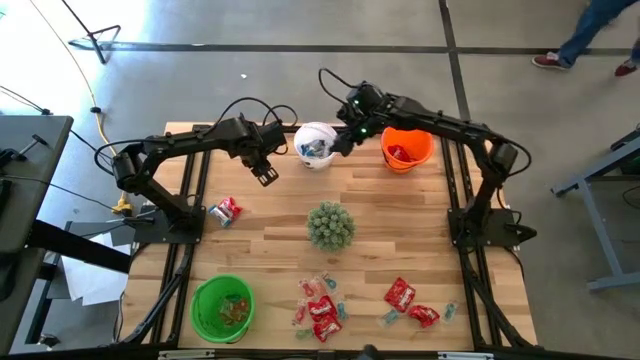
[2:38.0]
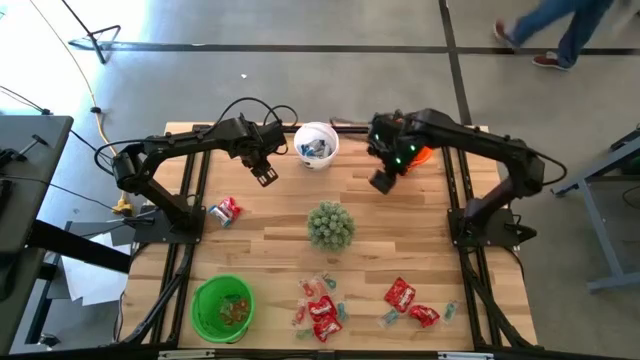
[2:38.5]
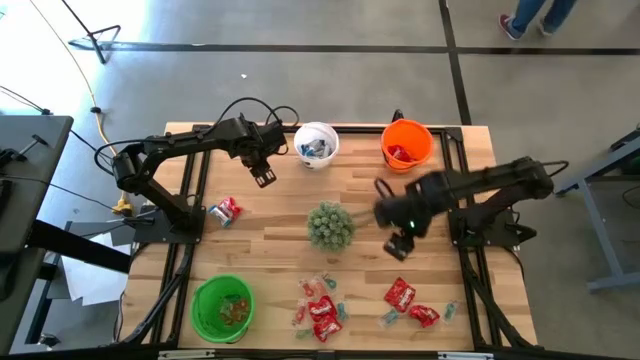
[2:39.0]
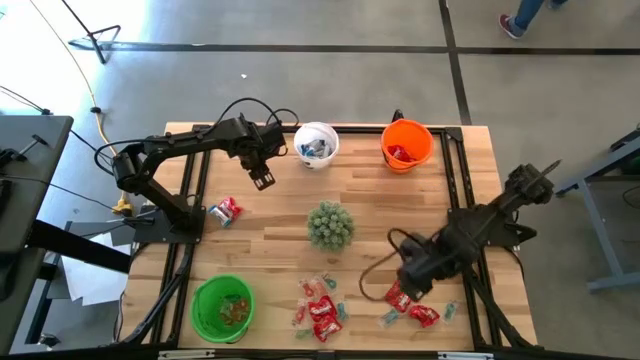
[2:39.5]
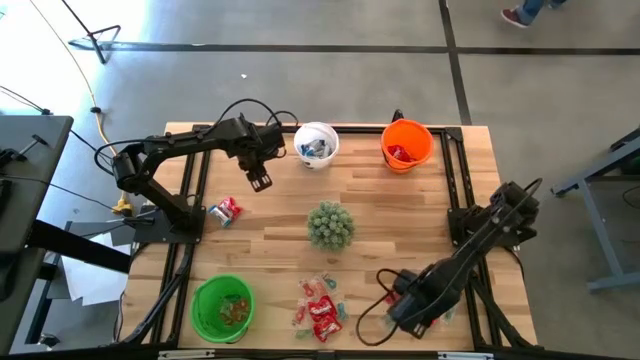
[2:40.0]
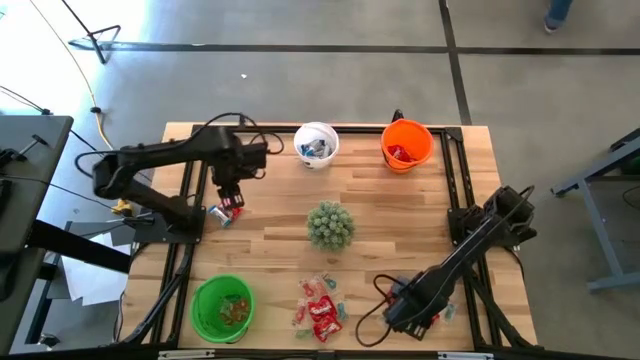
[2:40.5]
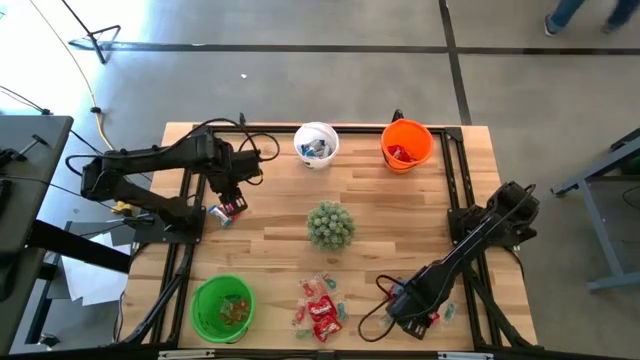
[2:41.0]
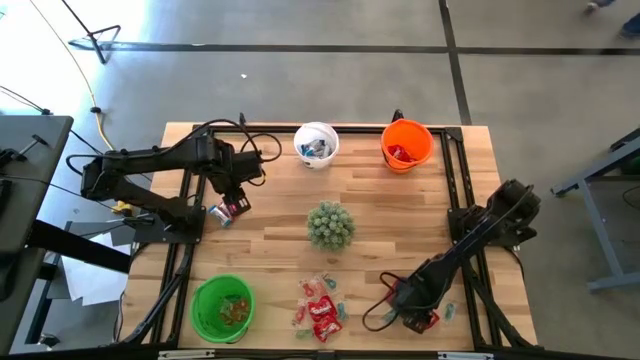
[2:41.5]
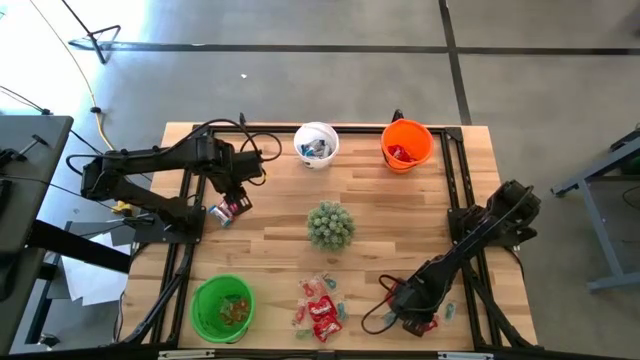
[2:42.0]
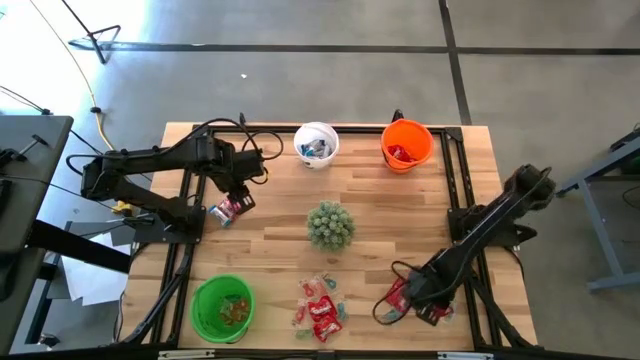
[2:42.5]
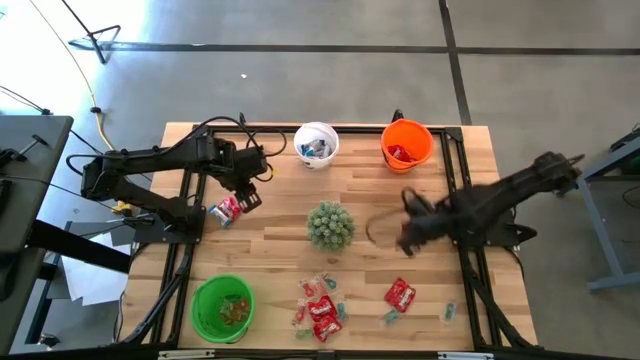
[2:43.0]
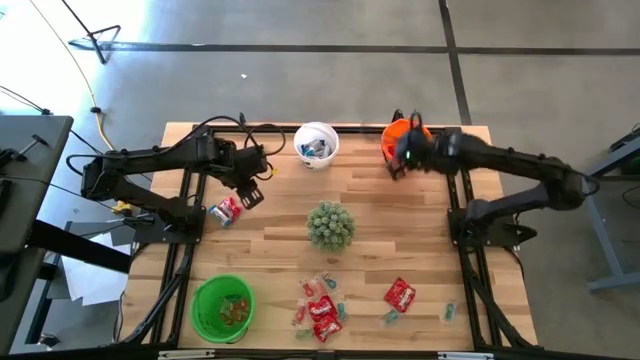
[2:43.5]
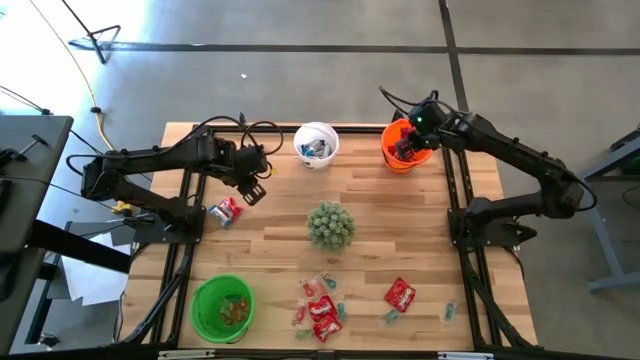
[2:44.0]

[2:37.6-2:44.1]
Task: Sort candy
Put the red candy into the orange bucket

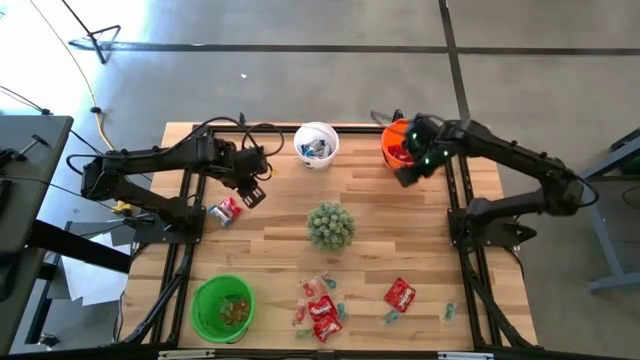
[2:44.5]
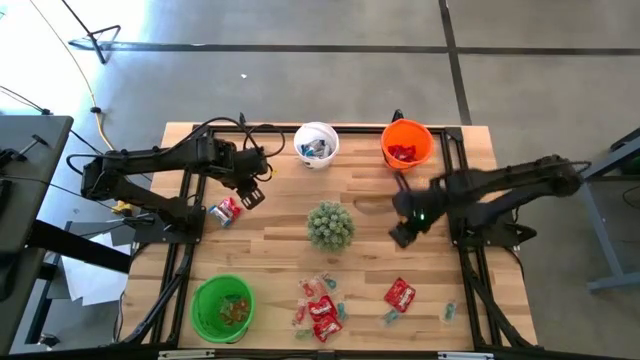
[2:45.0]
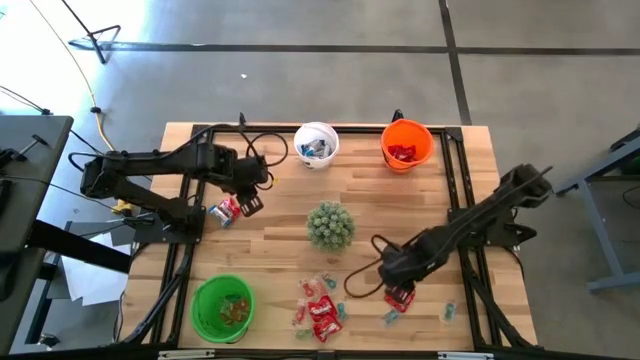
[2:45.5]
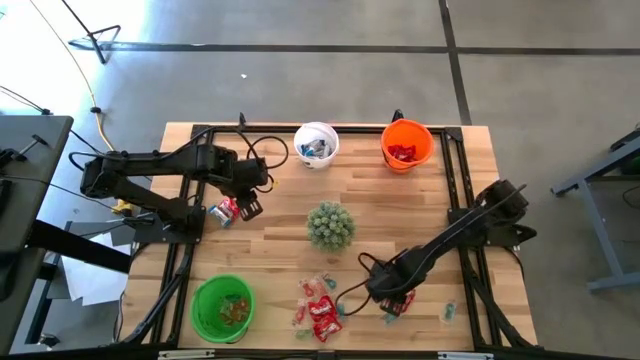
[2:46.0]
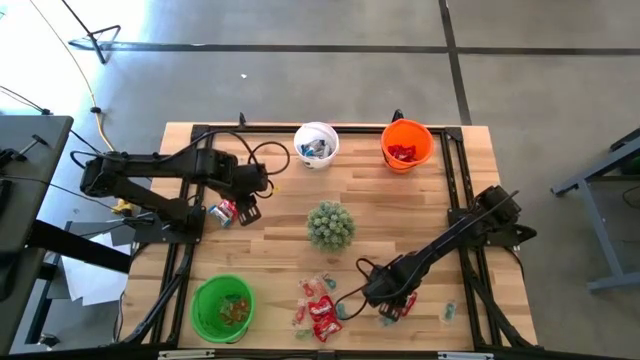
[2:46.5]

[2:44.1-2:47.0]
Put the red candy into the orange bucket

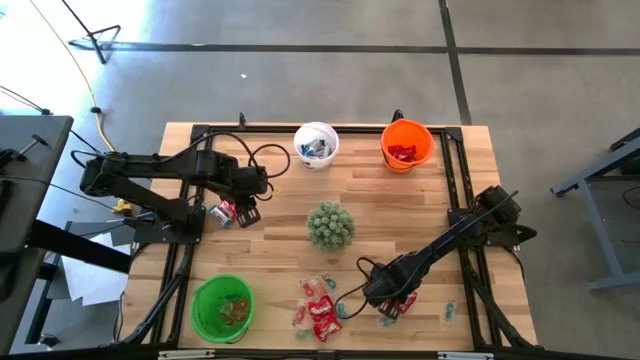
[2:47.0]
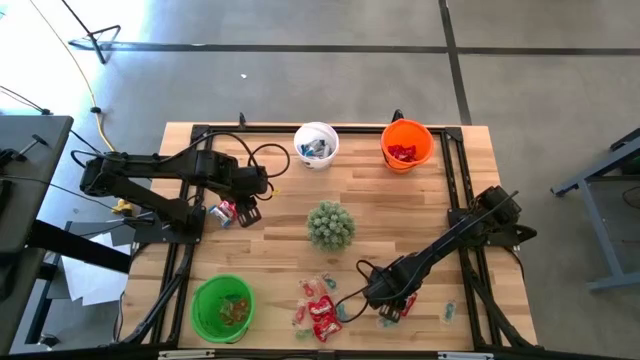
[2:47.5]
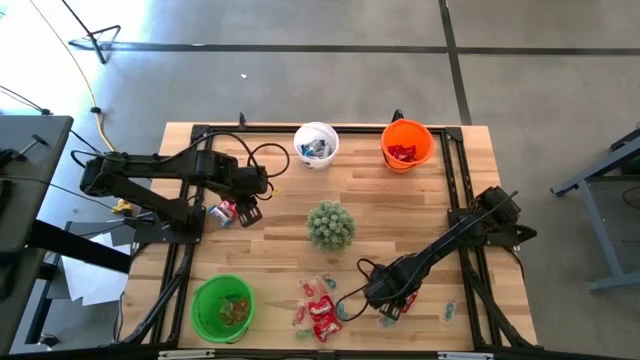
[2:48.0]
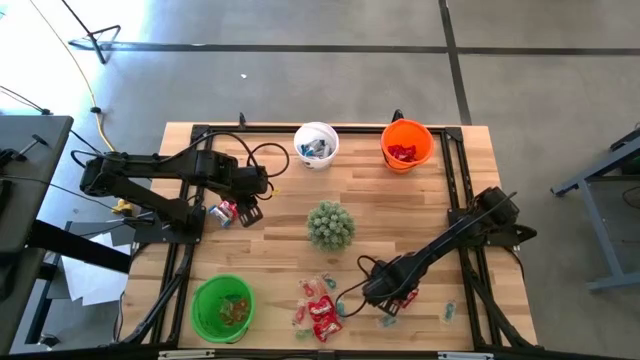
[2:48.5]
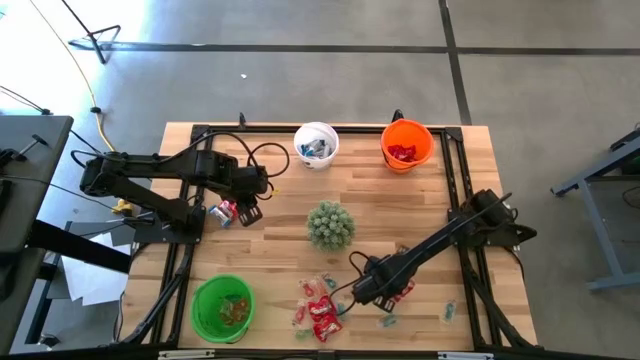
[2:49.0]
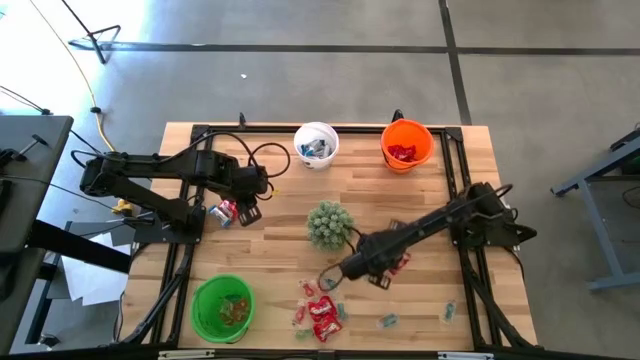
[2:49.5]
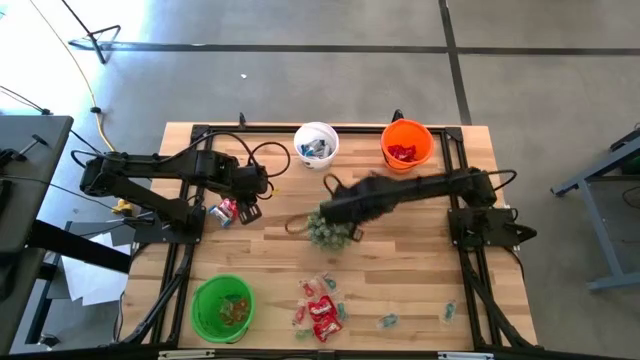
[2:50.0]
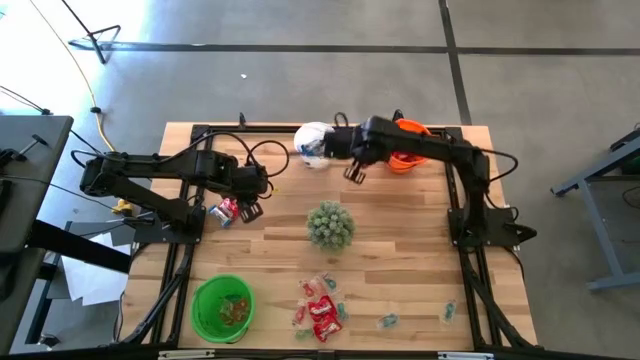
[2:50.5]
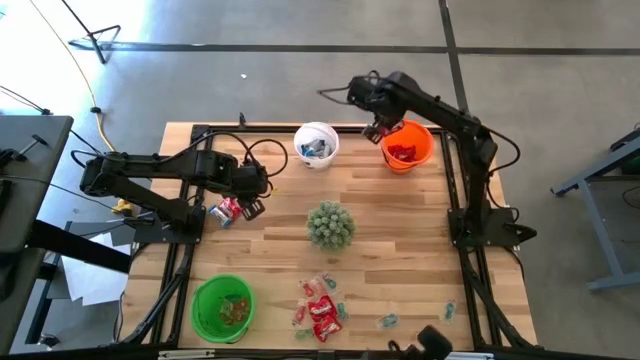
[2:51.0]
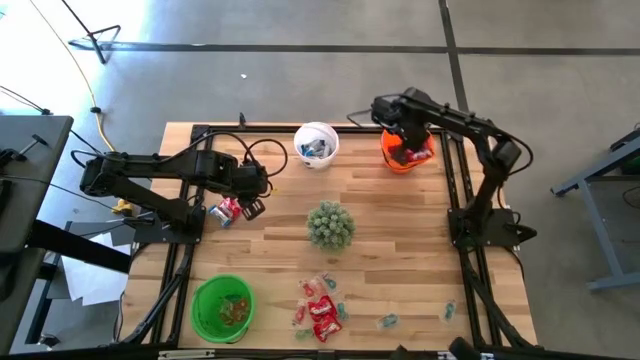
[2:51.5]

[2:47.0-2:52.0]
Put the red candy into the orange bucket

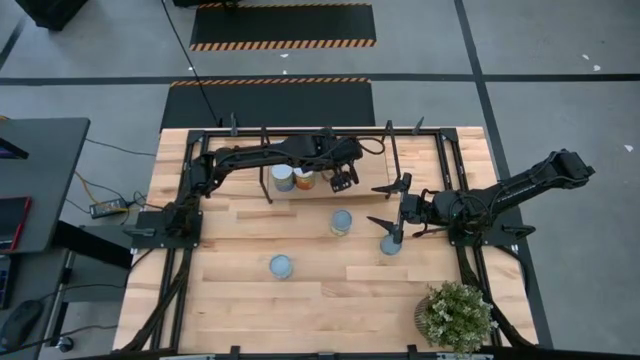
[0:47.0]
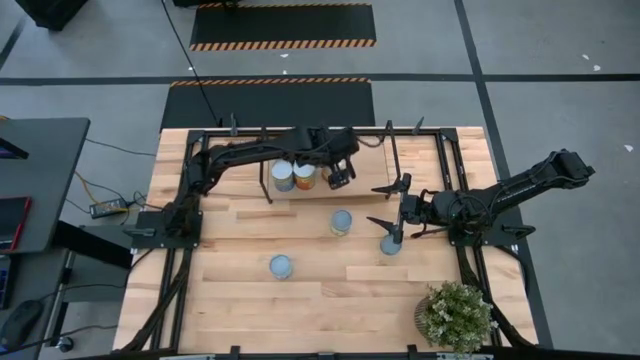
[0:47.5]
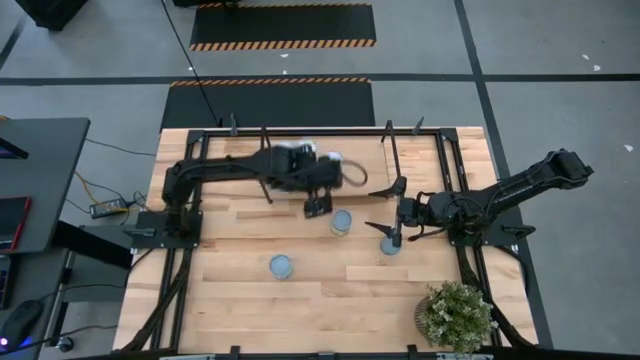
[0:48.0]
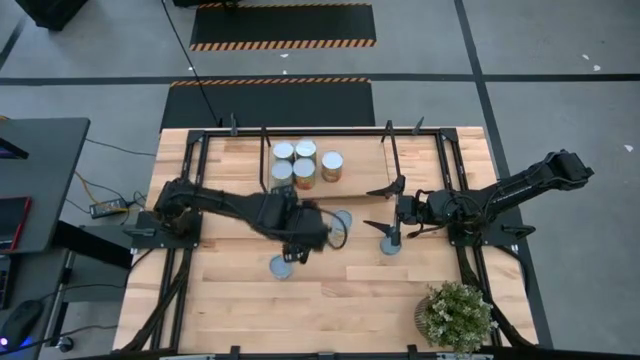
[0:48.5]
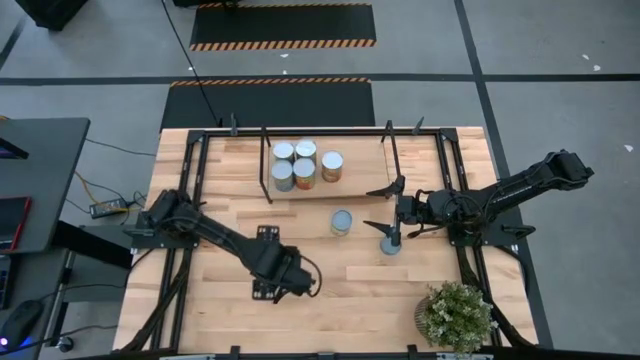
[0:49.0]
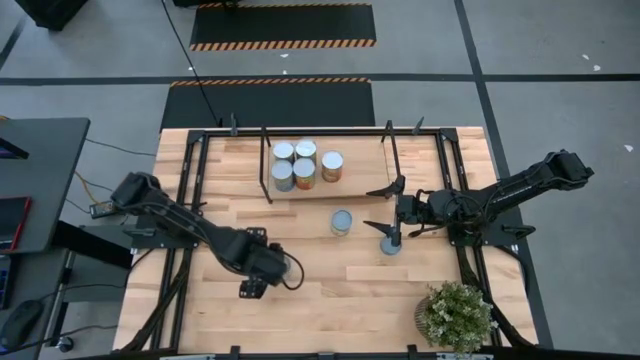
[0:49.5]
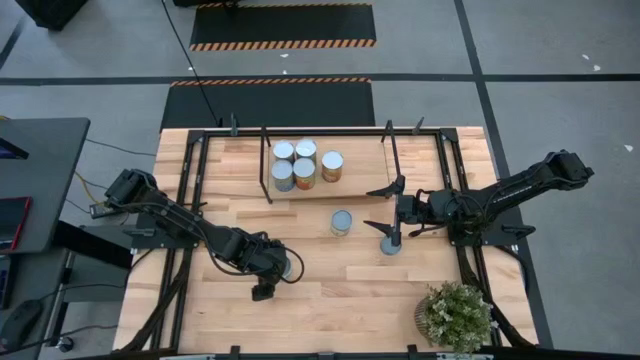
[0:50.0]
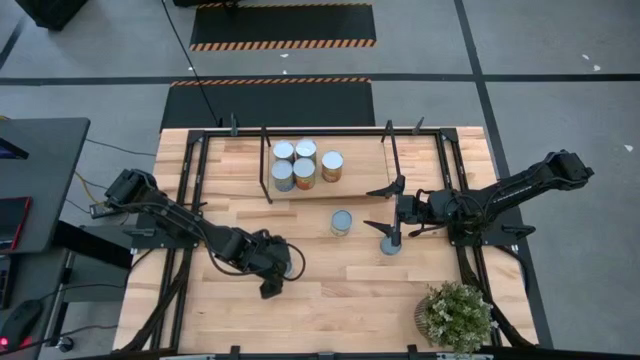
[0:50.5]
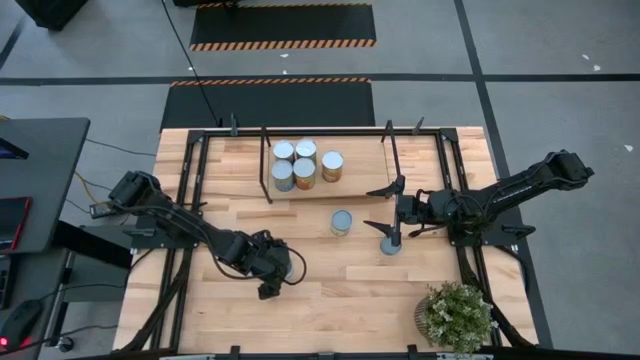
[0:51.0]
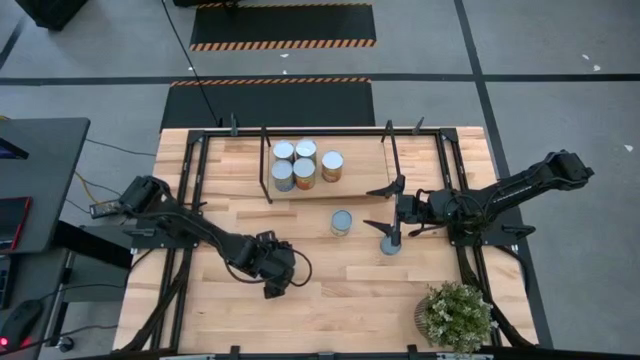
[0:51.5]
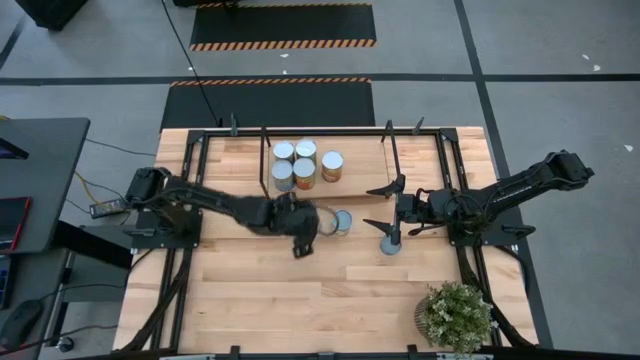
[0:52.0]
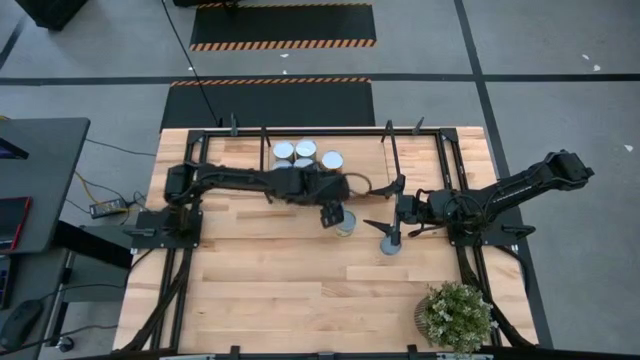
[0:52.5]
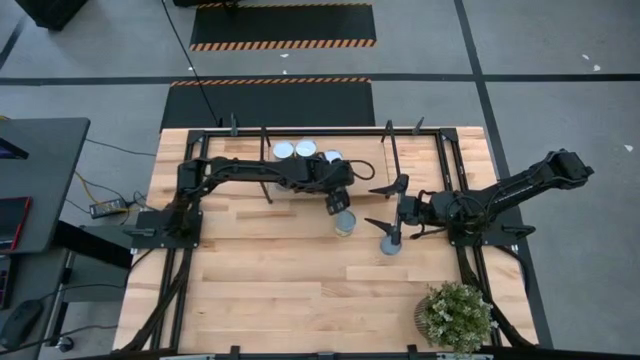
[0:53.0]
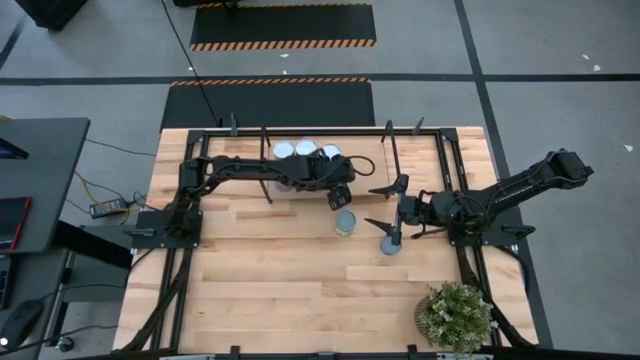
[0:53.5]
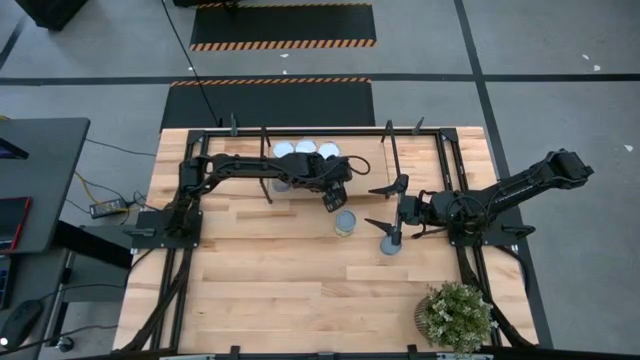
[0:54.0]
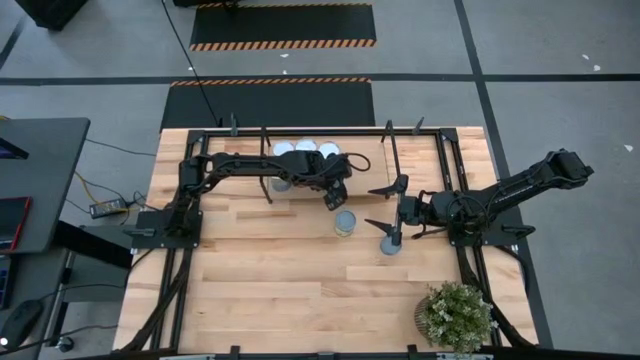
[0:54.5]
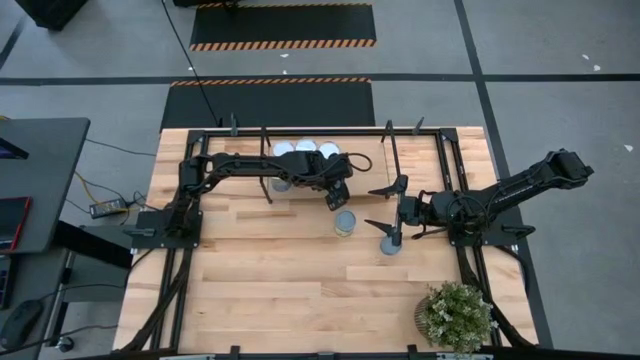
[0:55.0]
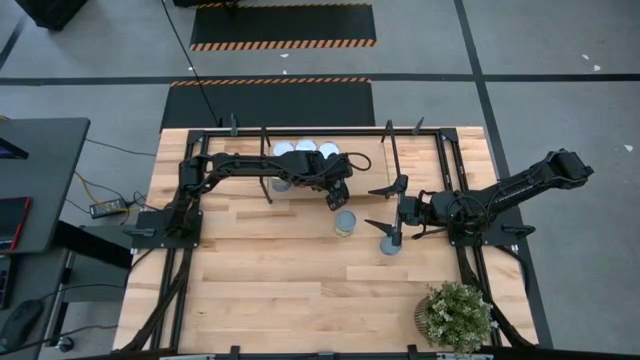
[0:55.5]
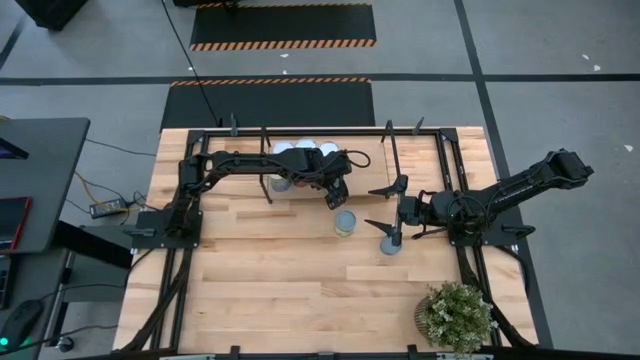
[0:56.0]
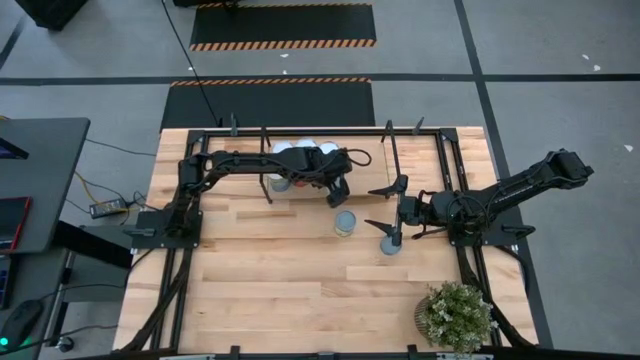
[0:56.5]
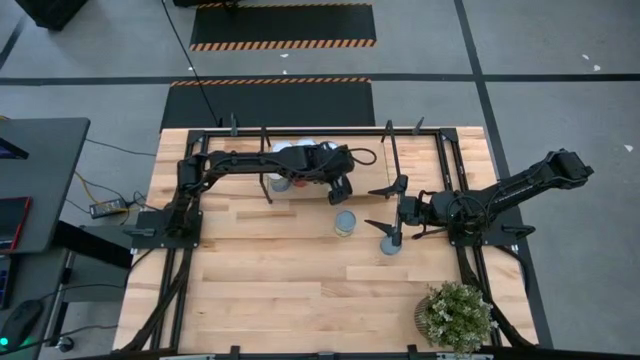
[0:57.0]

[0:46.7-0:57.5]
Task: Pick and place cans onto a shelf
Put the canned mixed vegetables on the shelf
